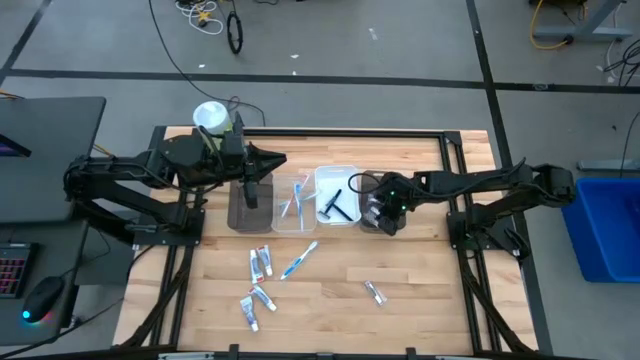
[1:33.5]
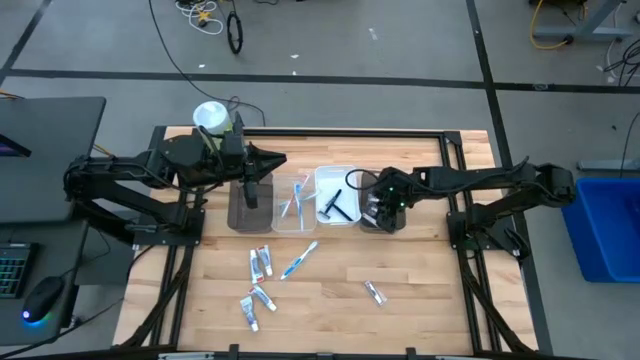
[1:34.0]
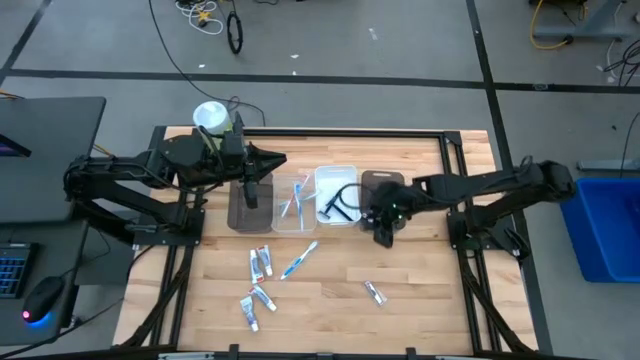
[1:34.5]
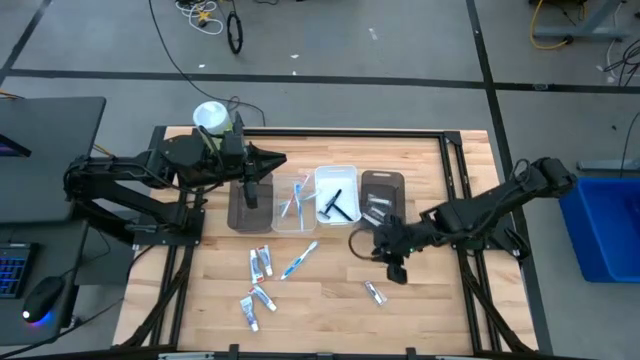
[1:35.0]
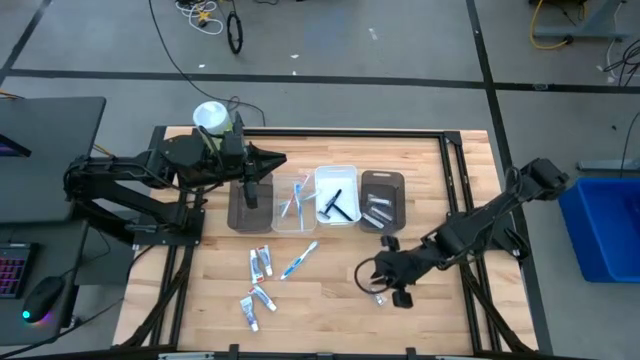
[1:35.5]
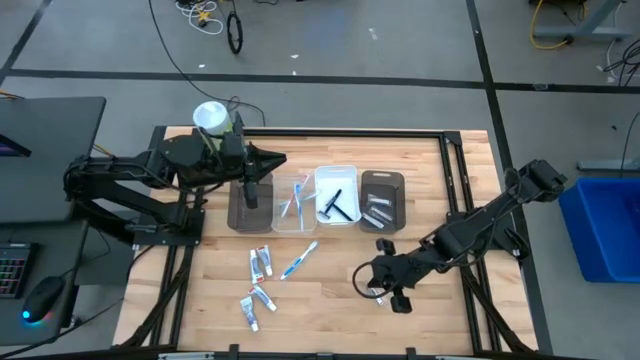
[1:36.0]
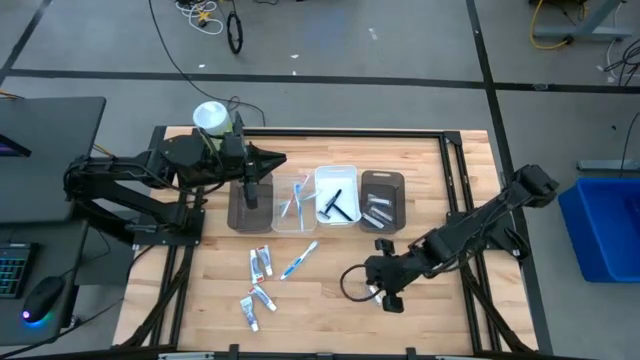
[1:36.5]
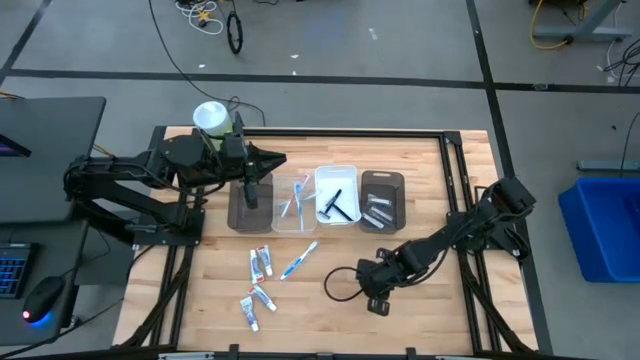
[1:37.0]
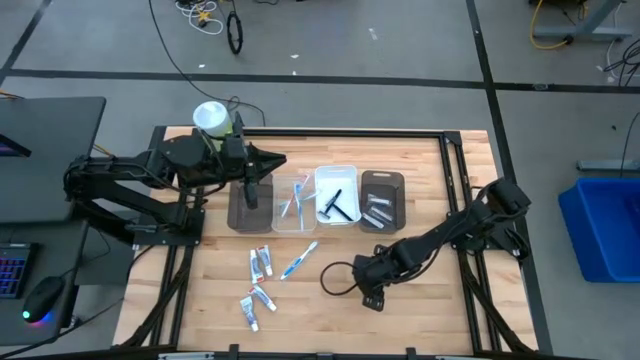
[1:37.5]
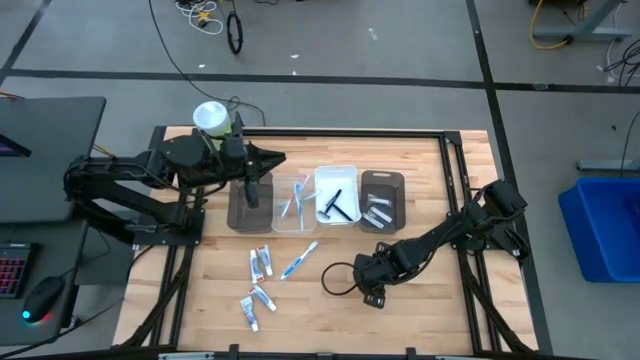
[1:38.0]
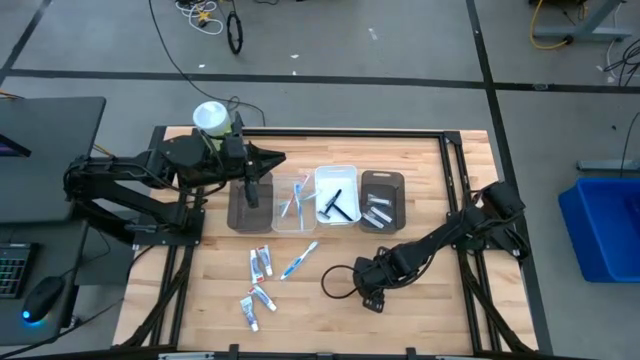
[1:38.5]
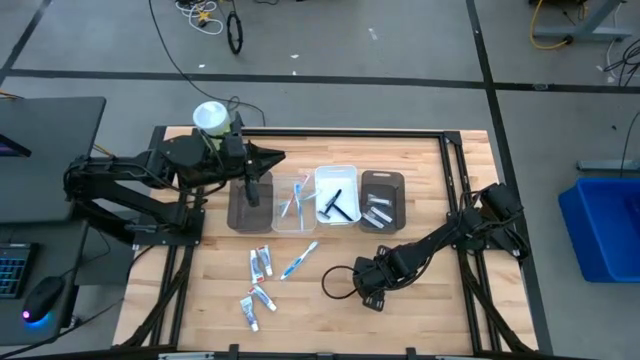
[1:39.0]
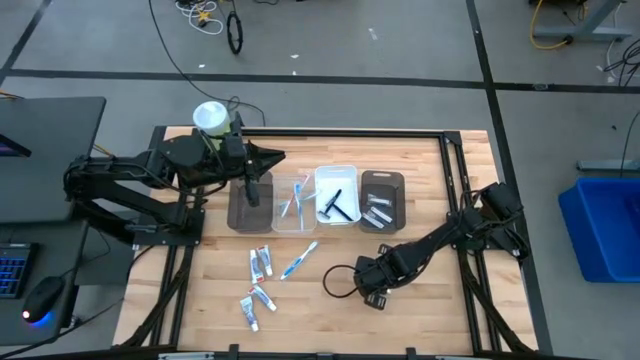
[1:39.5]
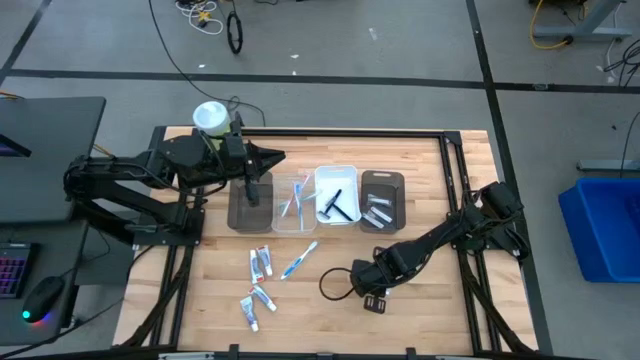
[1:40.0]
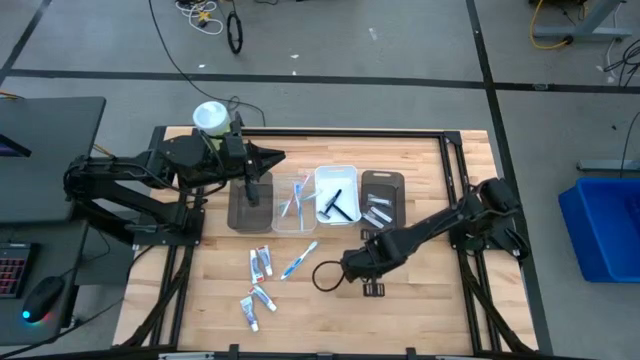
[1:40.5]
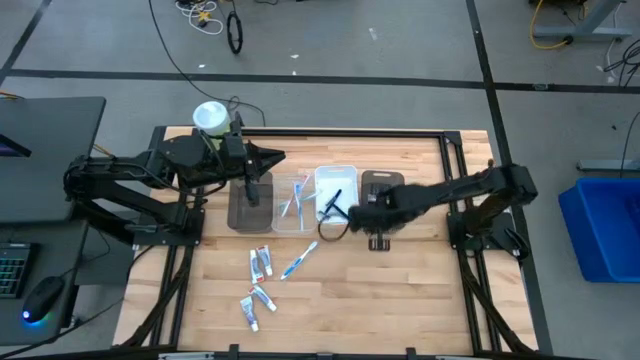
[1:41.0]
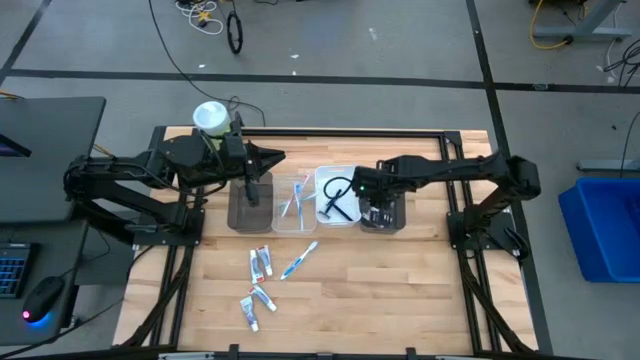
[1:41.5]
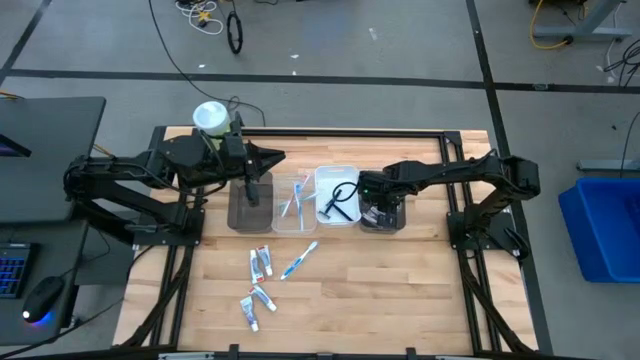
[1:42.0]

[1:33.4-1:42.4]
Task: Pick & Place Travel size toiletries
Put the silver nail cutter into the right black bin

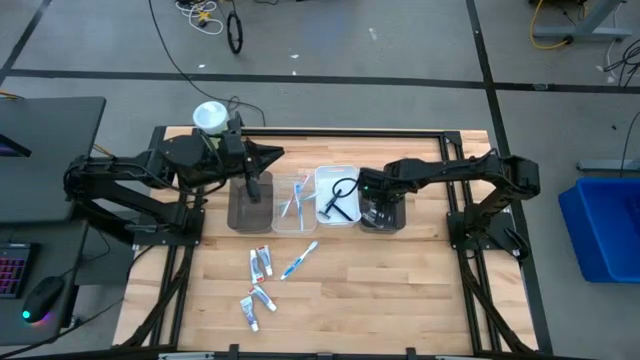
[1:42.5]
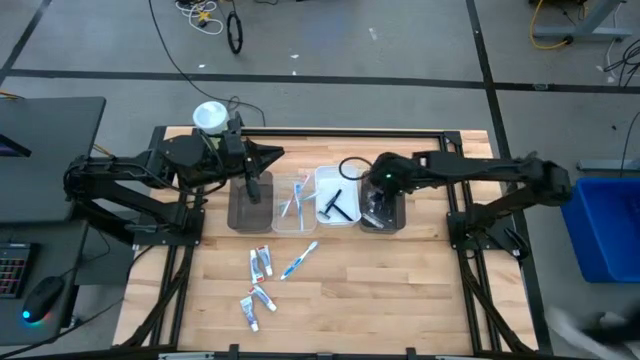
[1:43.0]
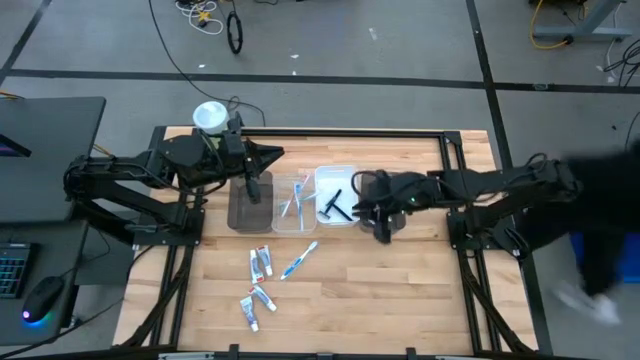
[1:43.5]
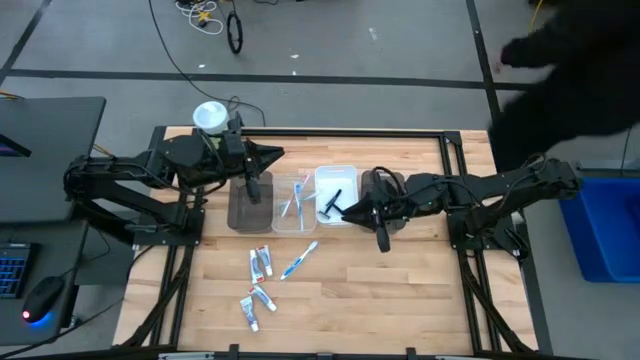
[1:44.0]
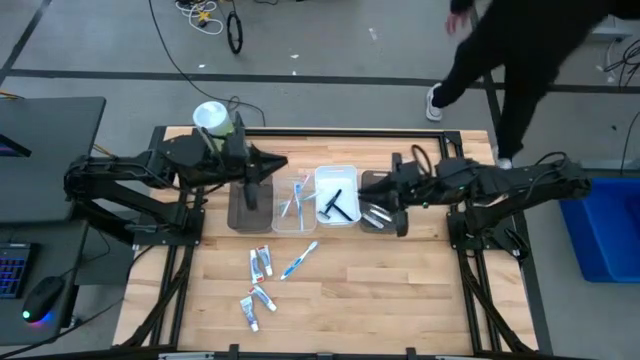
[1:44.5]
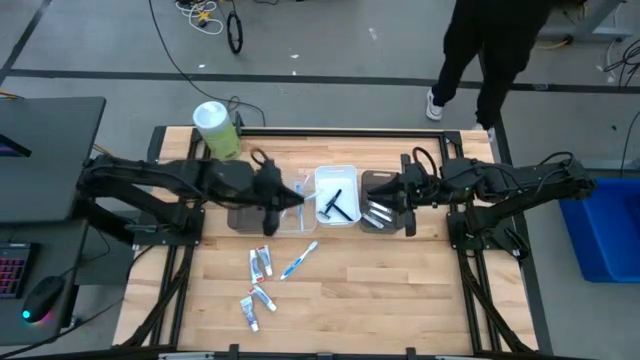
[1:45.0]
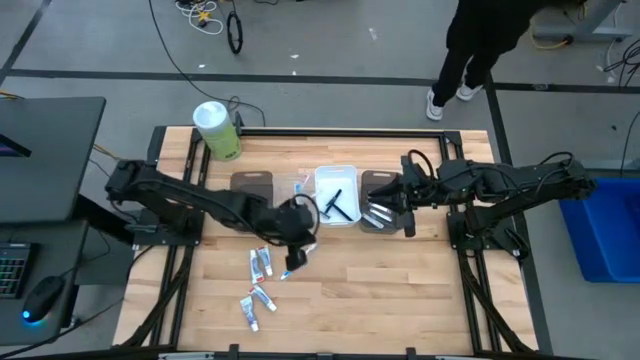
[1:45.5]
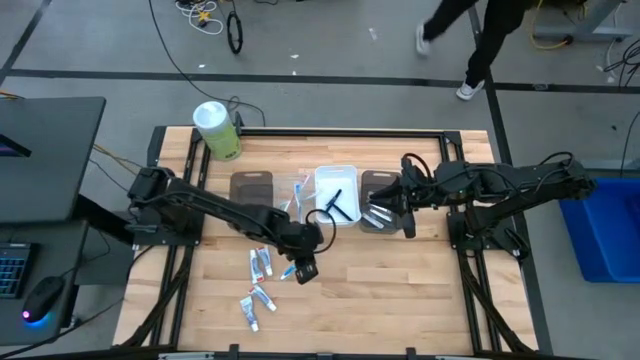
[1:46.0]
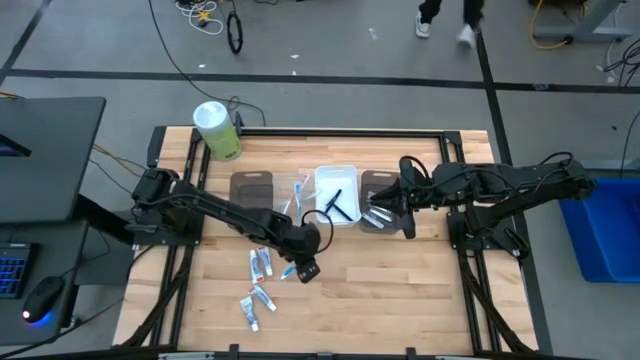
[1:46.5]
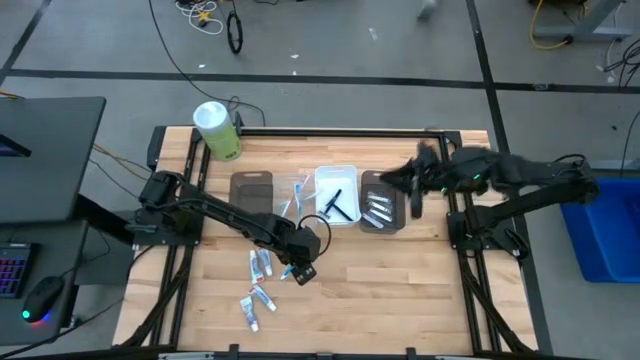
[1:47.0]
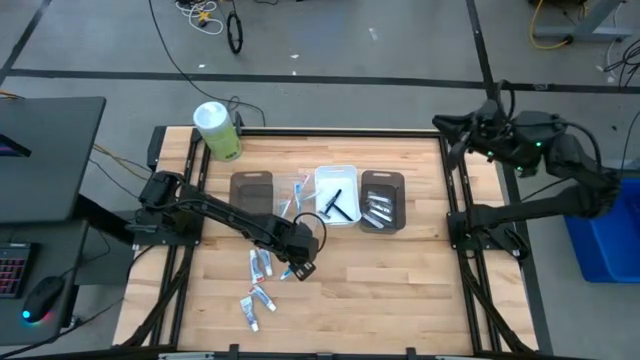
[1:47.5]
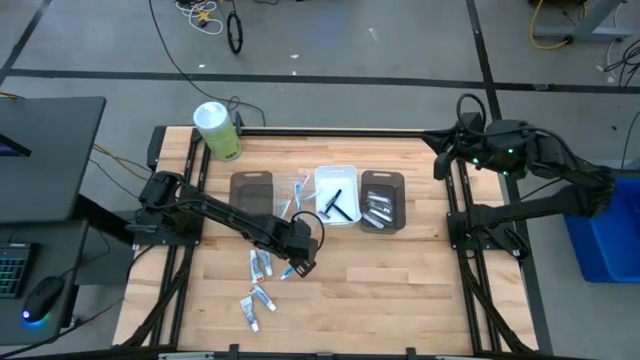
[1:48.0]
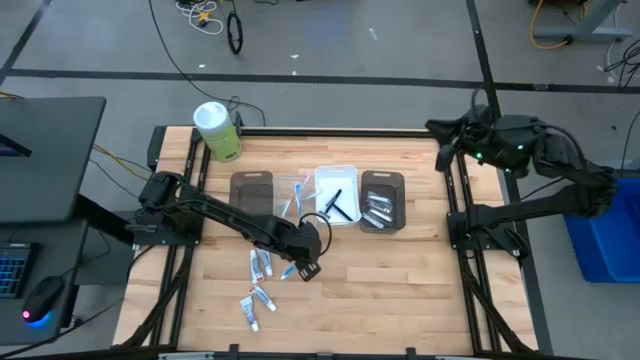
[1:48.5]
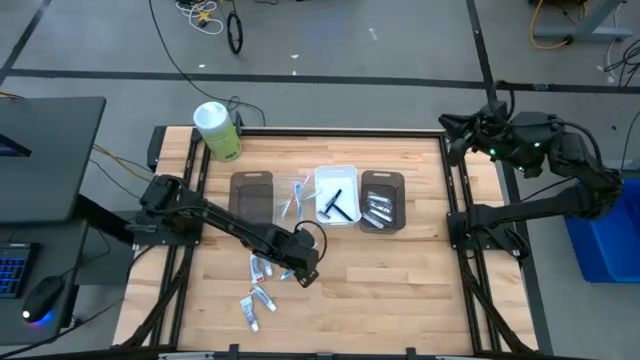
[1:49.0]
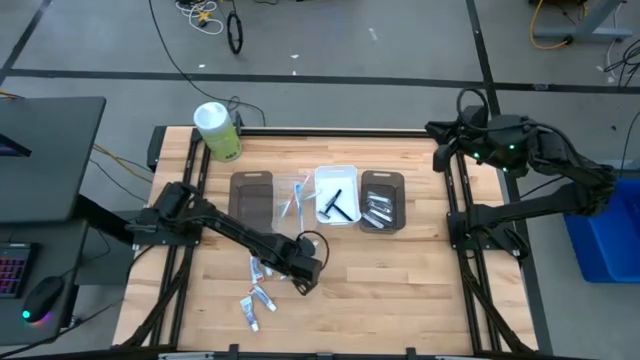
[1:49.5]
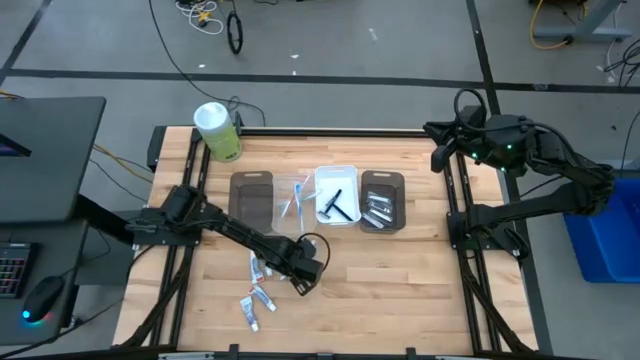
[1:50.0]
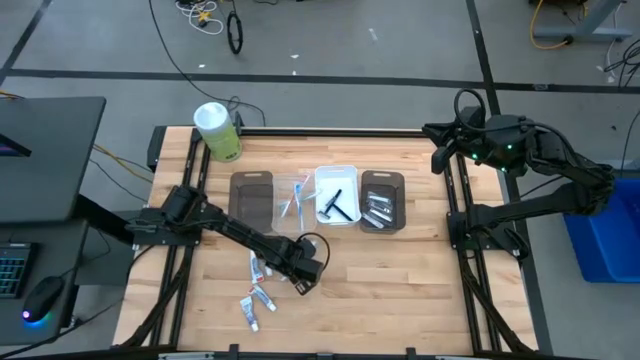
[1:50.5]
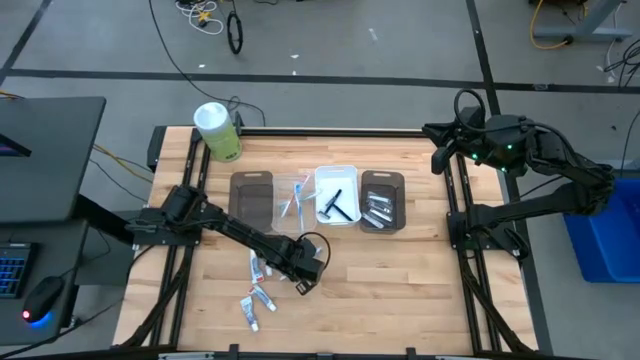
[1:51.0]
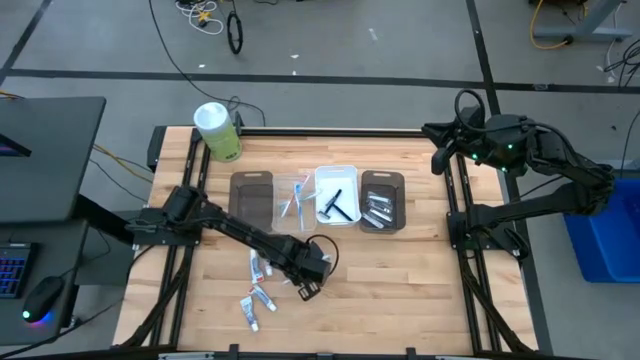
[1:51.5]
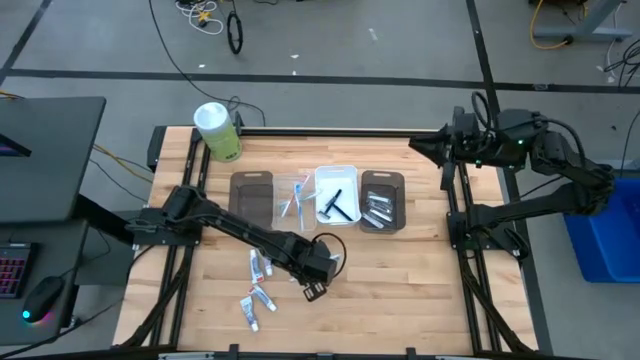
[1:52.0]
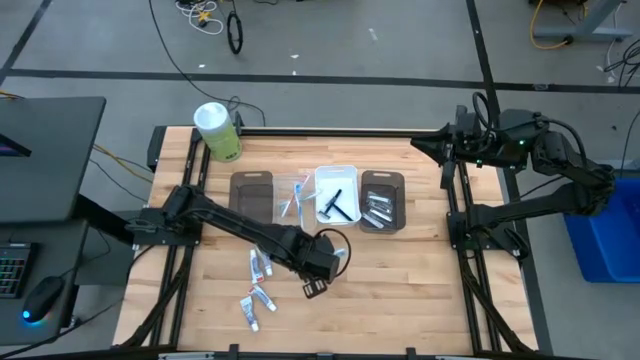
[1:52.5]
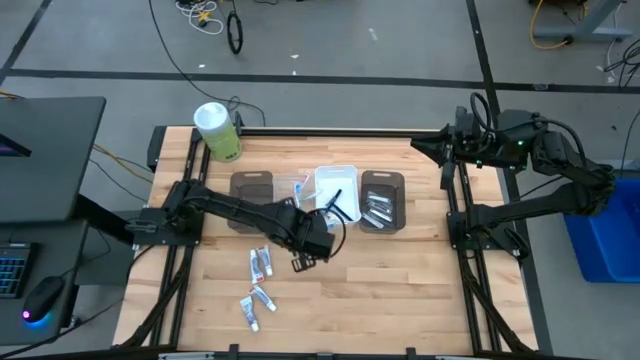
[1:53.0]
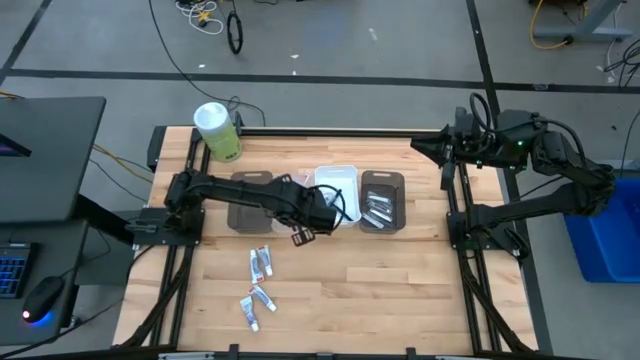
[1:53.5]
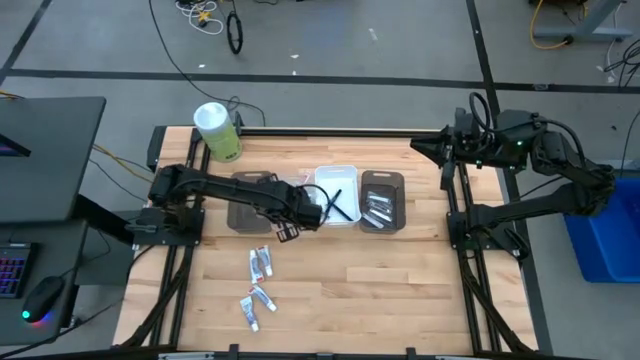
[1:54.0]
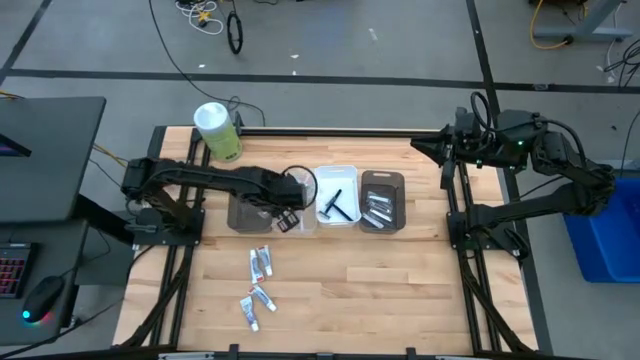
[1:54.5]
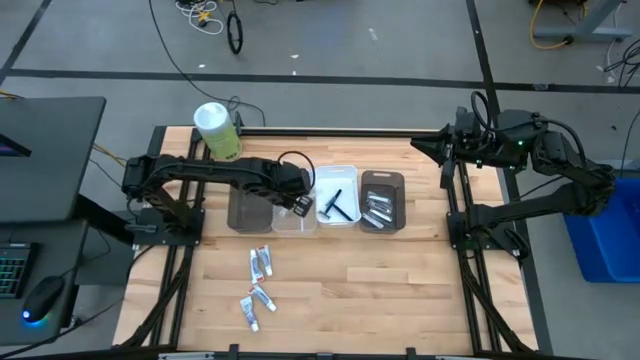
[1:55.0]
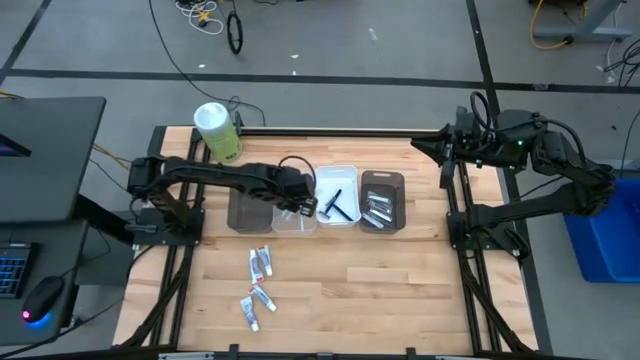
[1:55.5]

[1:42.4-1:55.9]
Put the blue toothbrush into the transparent bin
